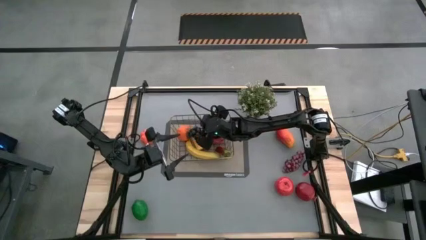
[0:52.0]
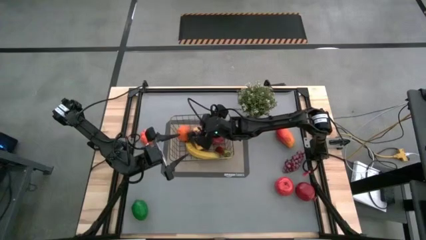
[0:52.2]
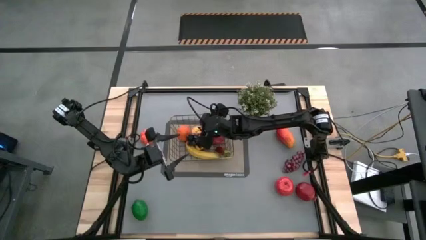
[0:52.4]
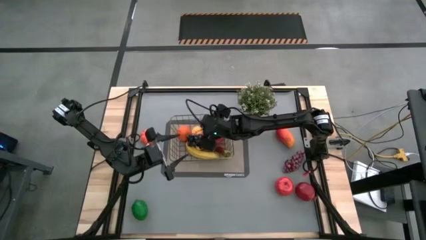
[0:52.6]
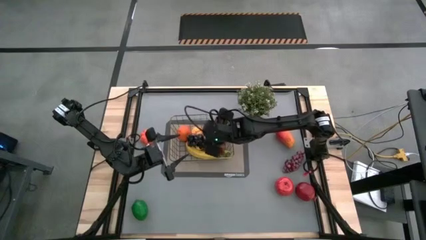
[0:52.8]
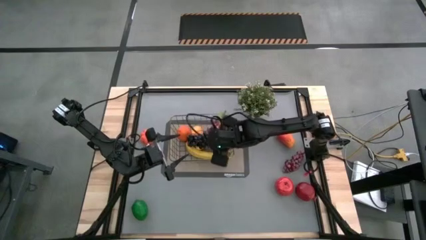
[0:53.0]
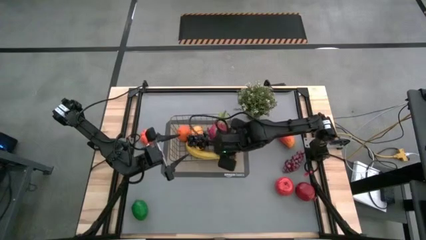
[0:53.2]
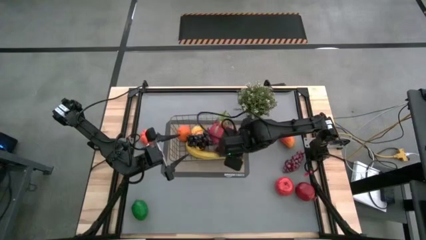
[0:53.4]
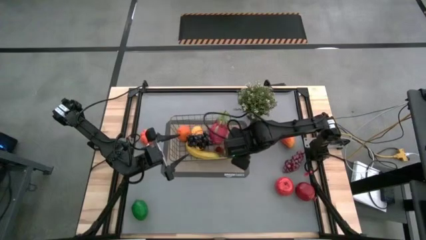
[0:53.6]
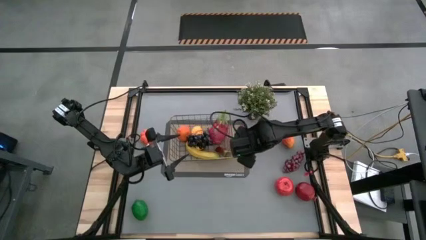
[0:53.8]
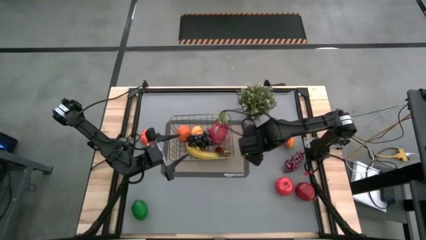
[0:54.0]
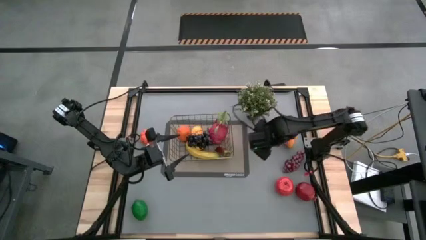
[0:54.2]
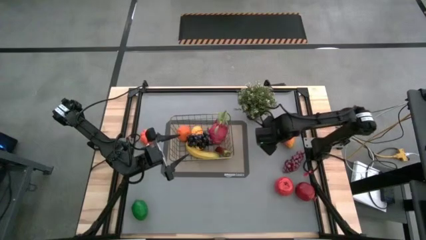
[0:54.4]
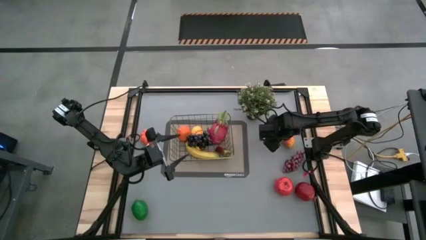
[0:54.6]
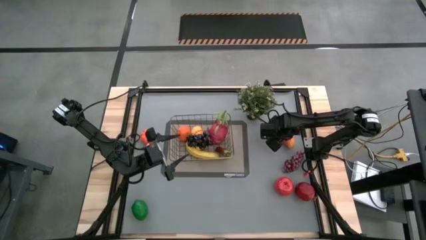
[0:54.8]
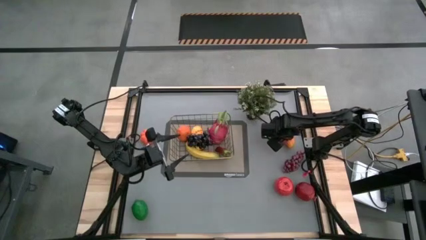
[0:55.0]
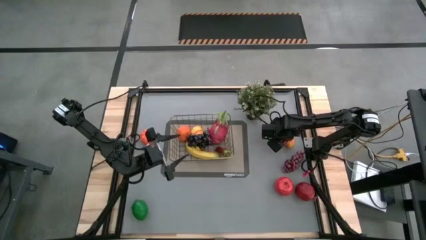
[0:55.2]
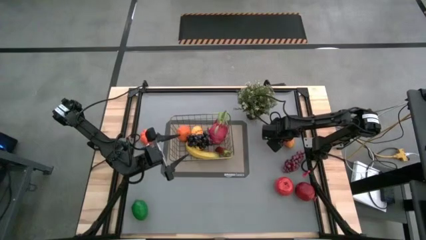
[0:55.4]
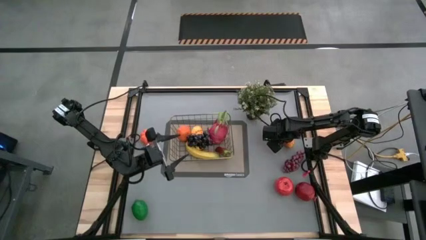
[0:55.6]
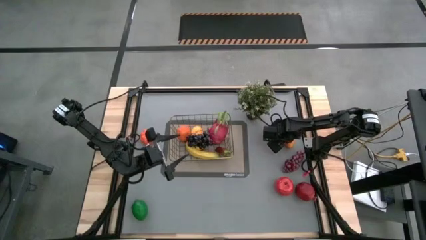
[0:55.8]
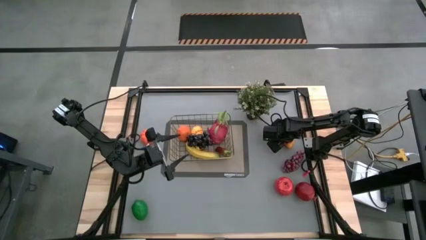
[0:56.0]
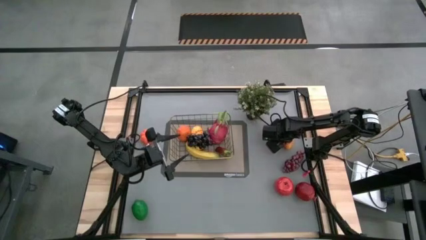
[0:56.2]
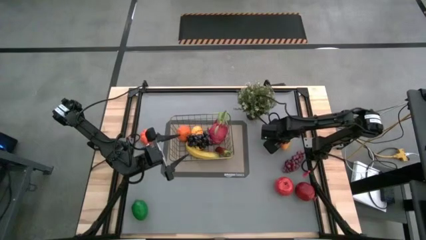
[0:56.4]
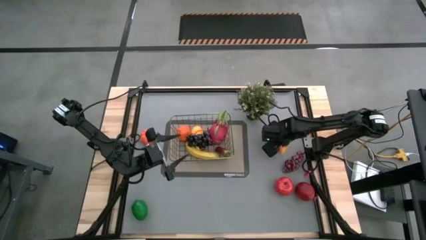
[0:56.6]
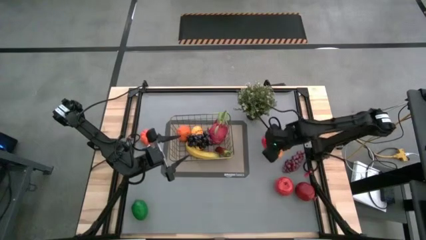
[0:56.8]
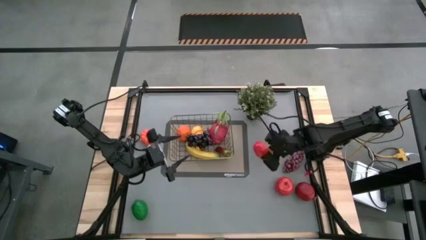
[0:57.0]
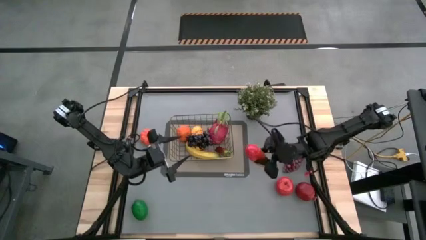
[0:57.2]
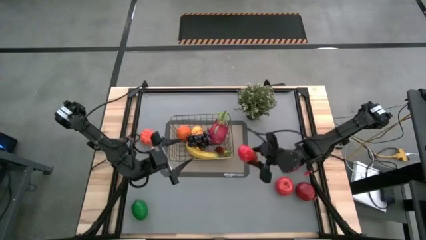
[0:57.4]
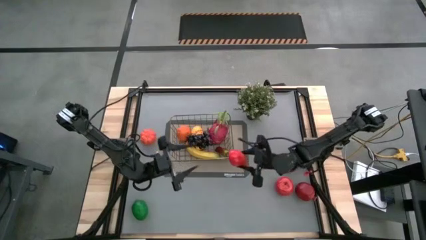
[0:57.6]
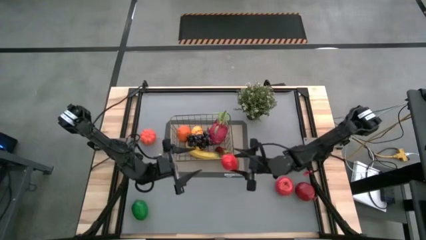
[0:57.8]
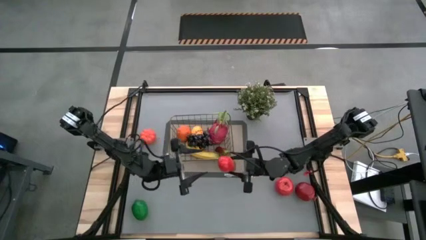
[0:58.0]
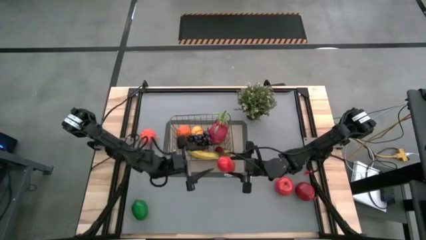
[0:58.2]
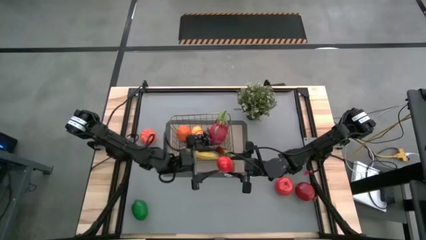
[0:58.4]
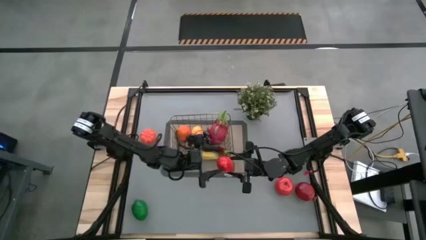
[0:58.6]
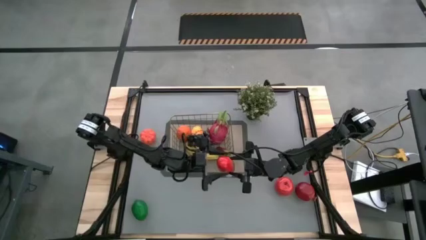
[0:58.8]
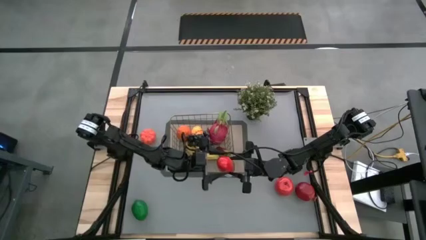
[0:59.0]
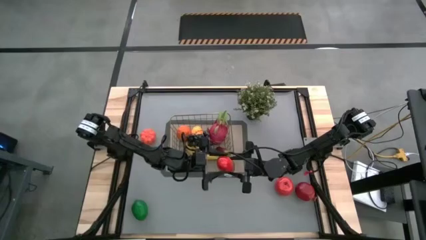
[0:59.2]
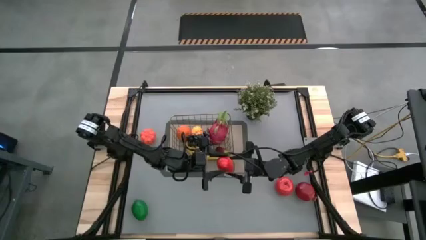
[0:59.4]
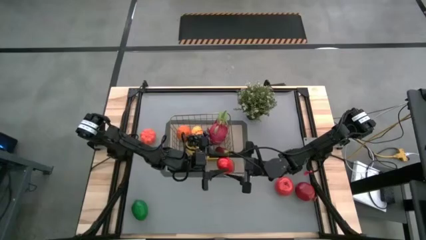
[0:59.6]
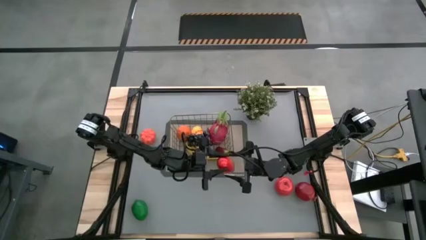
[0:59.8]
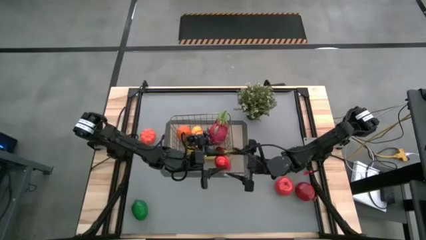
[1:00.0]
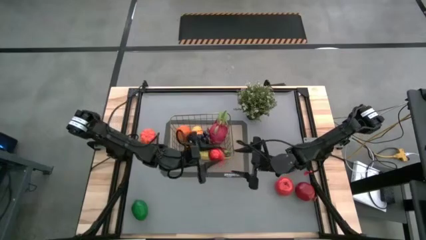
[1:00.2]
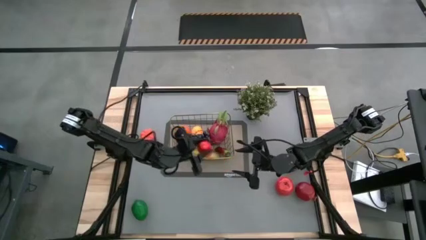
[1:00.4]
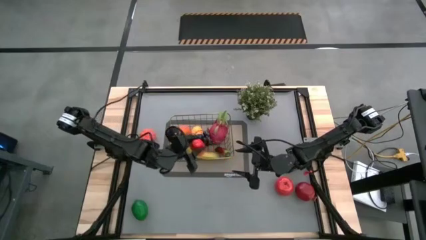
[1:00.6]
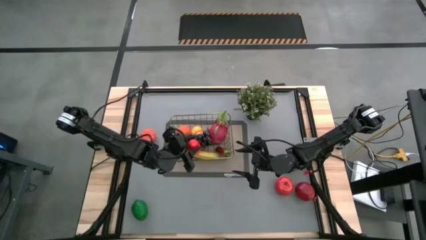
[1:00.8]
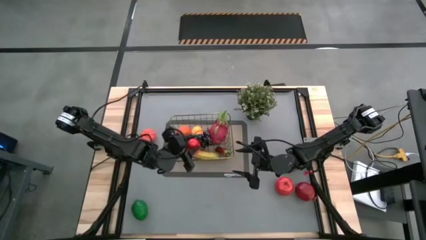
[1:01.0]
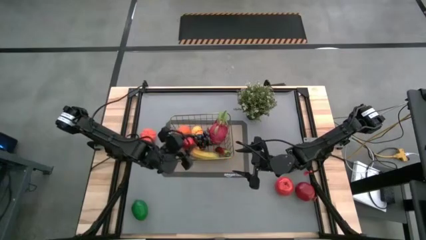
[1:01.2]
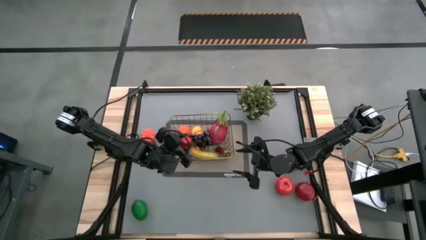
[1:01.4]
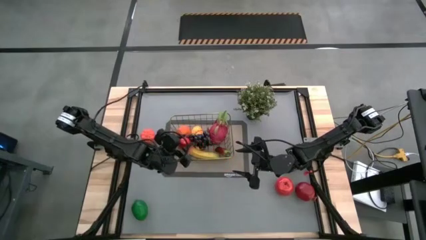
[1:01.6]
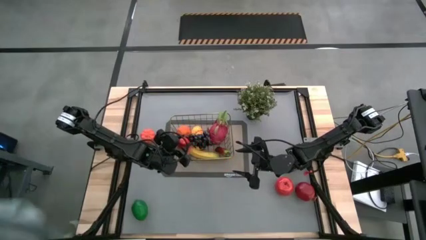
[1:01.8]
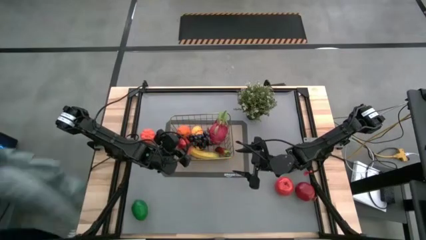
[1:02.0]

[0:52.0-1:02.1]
Task: Build produce basket
Put the mango into the wire basket

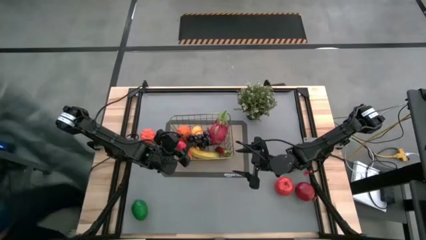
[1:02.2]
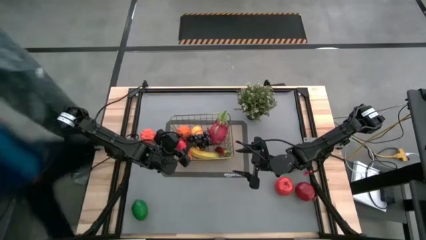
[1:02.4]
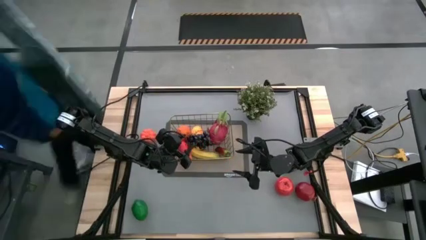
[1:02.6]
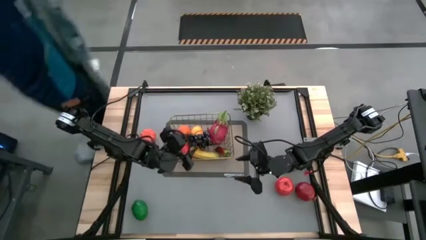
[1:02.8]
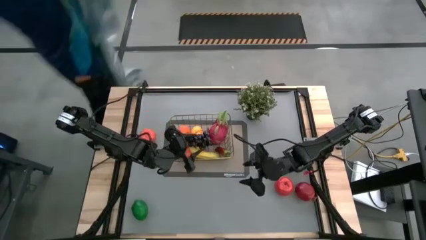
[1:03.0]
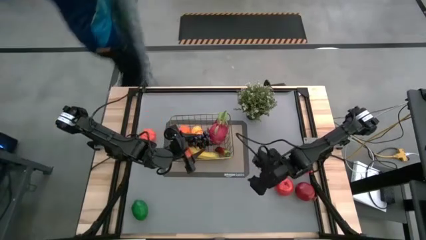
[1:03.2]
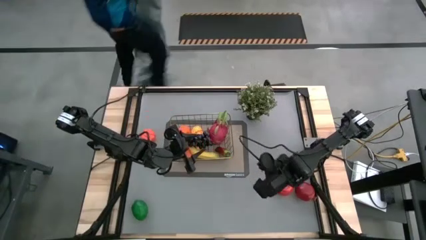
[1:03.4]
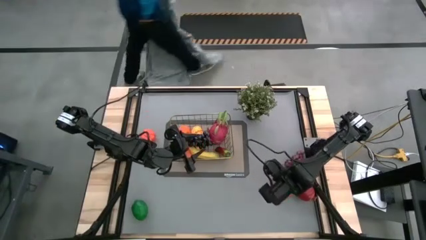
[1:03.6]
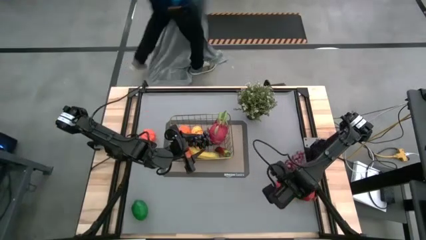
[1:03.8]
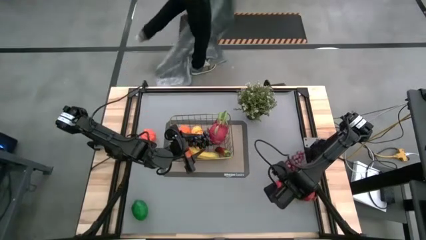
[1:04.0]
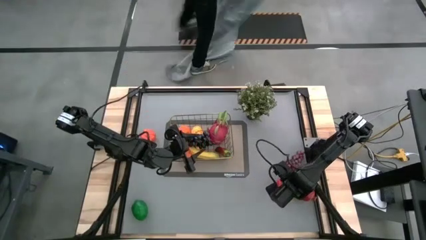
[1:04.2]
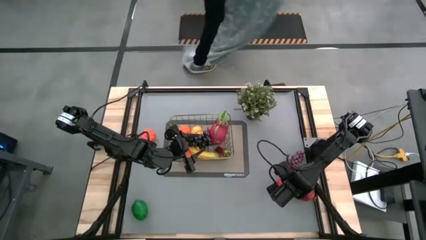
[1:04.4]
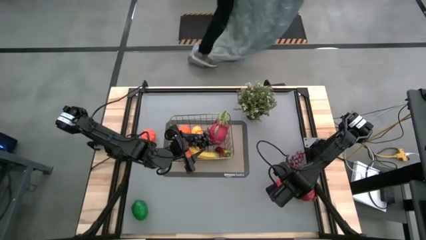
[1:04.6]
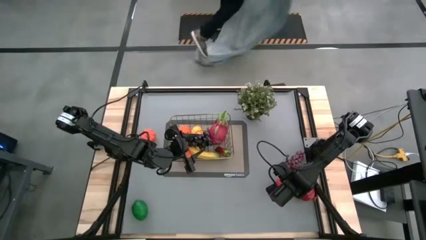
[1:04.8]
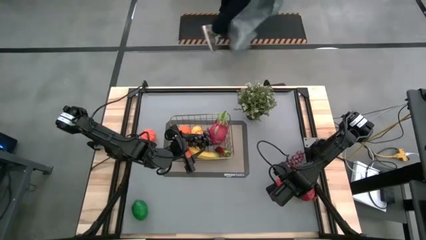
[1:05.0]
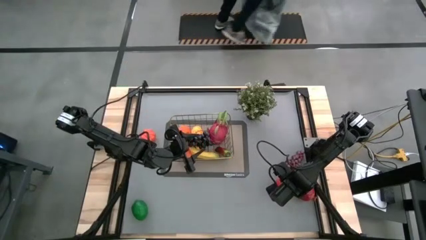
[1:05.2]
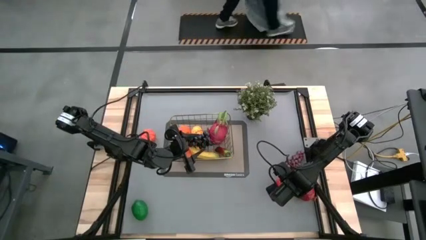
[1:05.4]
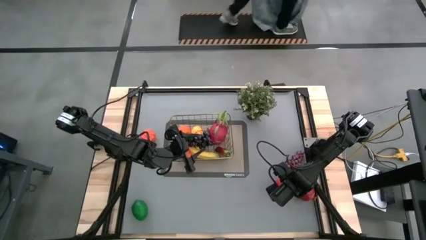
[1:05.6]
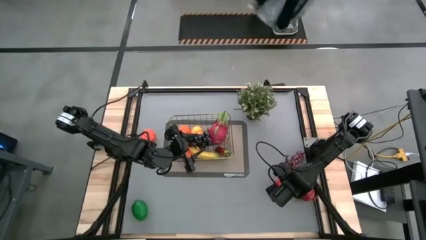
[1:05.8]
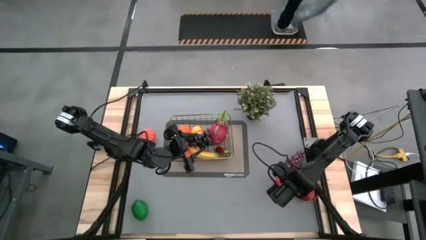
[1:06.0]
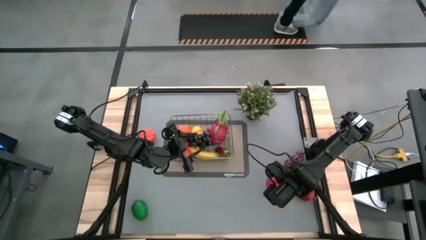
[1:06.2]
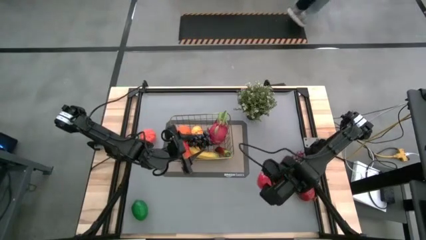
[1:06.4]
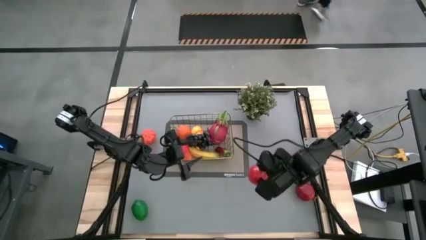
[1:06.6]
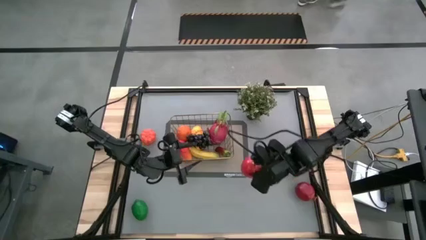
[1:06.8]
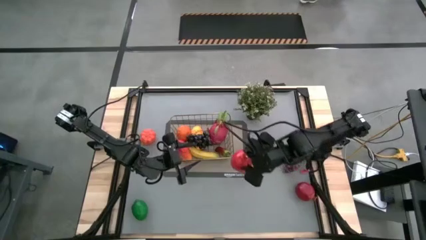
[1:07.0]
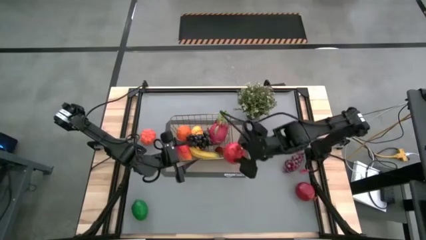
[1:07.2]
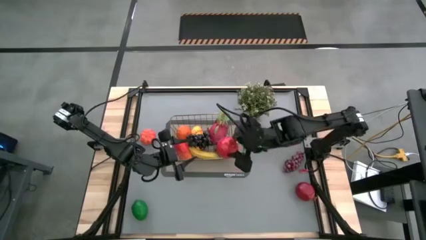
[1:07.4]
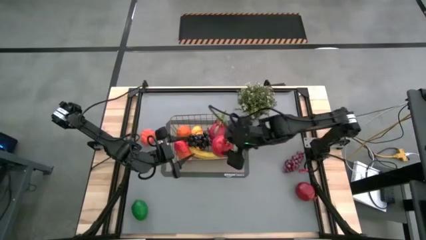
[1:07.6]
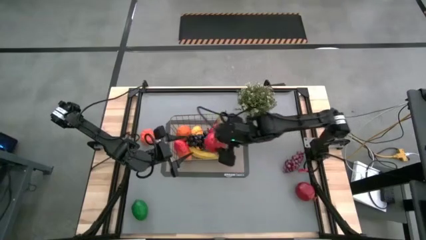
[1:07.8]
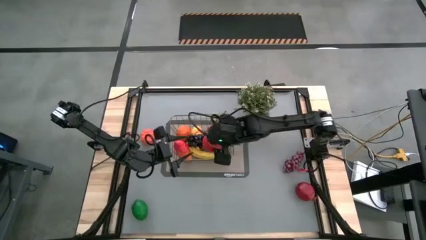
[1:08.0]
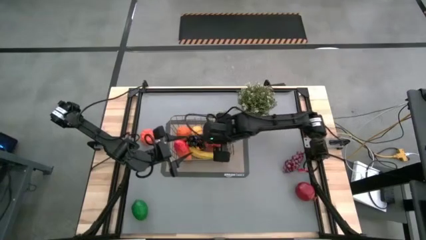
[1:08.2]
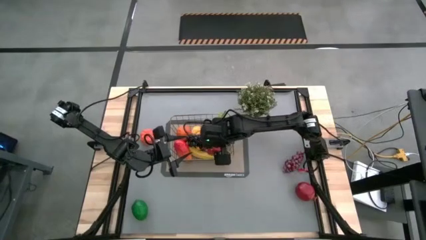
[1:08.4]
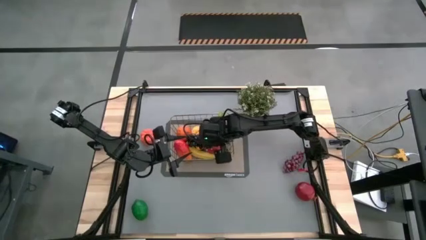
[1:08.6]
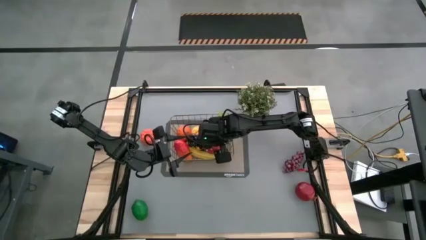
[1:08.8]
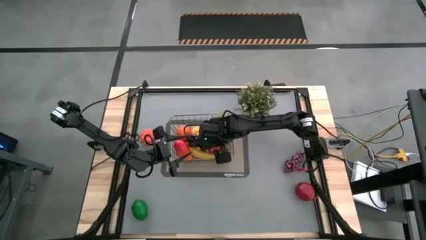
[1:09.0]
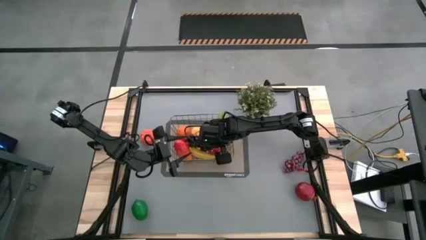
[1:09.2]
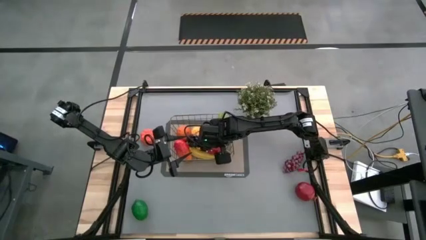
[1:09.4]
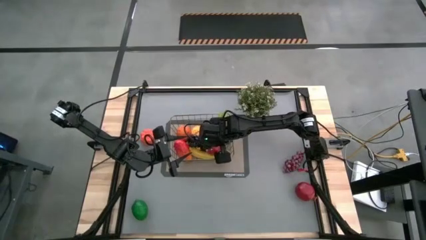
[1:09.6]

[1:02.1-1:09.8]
Put the apple into the wire basket
